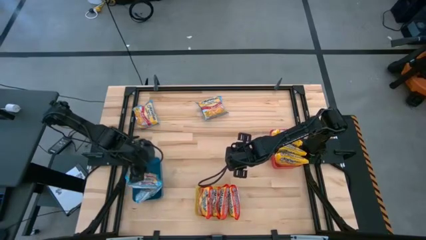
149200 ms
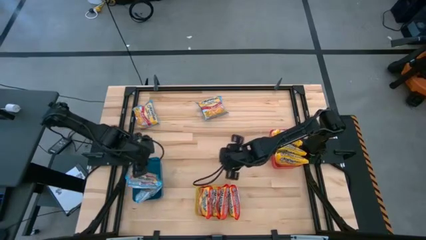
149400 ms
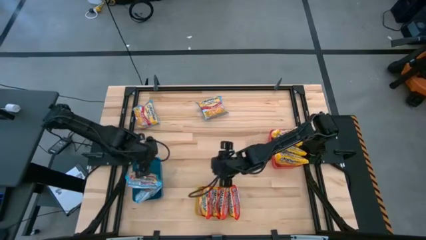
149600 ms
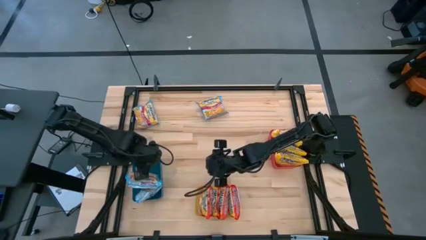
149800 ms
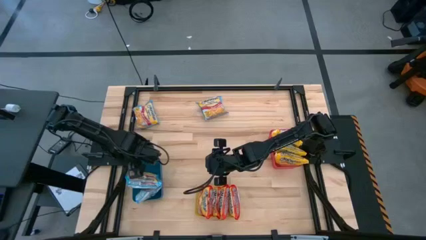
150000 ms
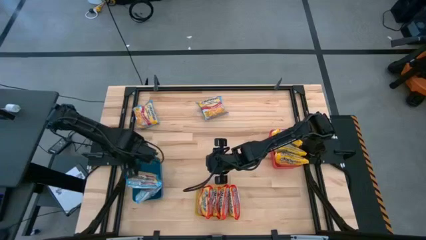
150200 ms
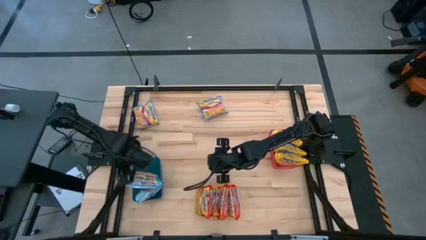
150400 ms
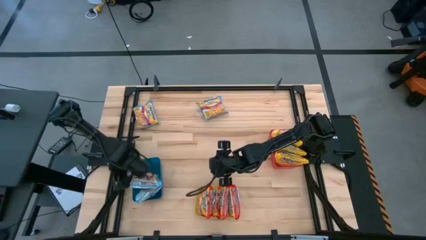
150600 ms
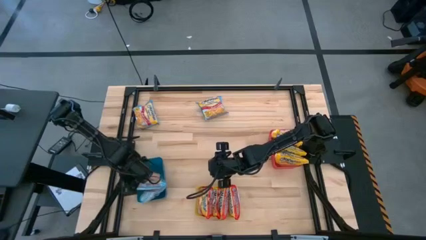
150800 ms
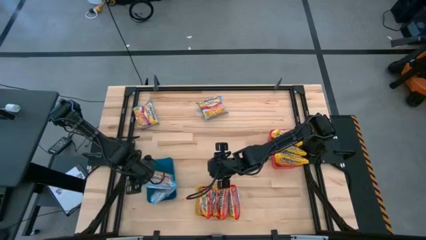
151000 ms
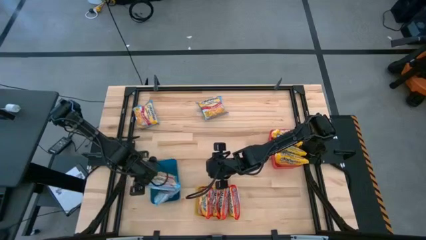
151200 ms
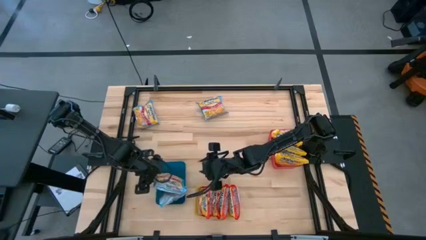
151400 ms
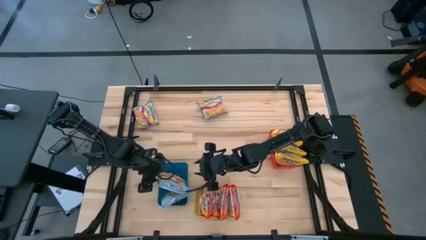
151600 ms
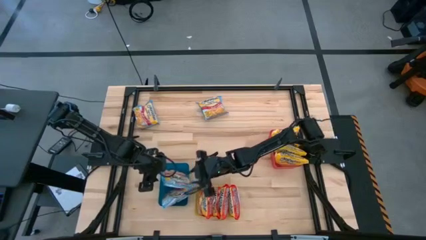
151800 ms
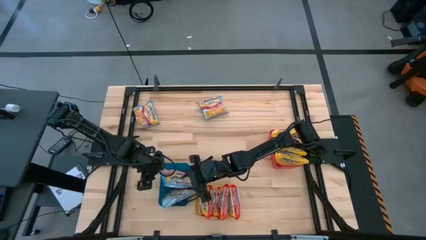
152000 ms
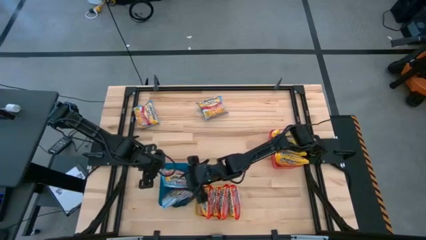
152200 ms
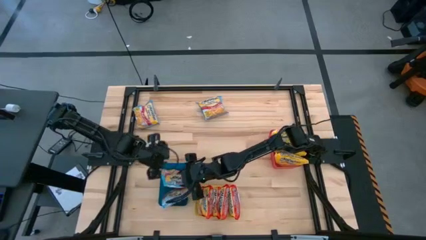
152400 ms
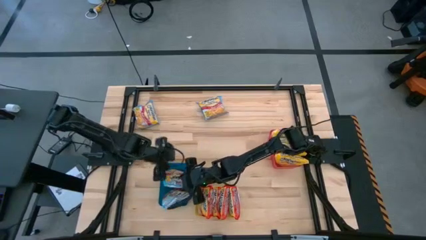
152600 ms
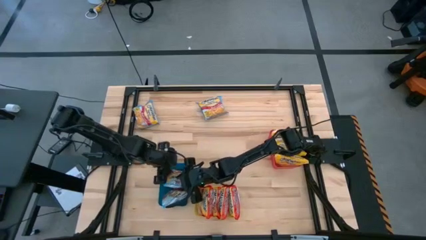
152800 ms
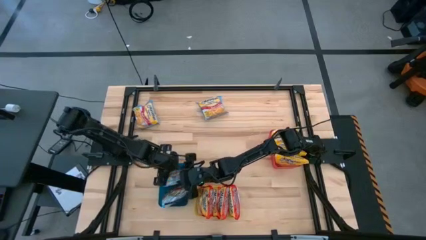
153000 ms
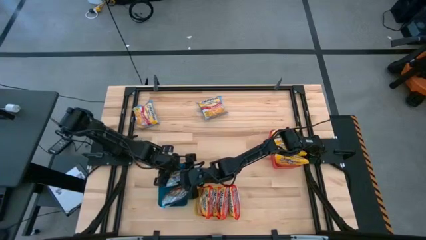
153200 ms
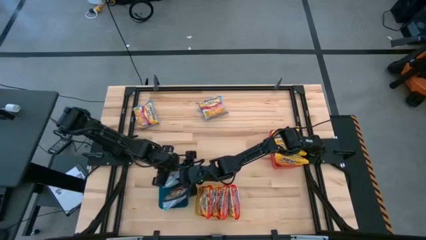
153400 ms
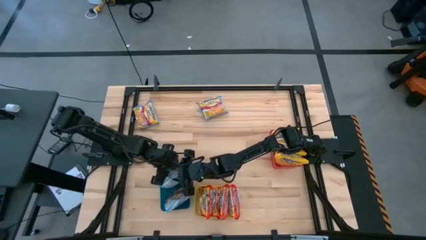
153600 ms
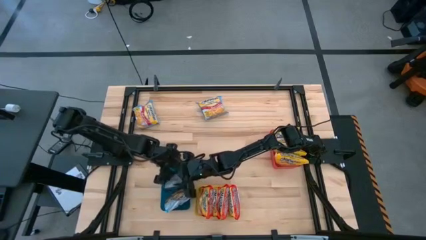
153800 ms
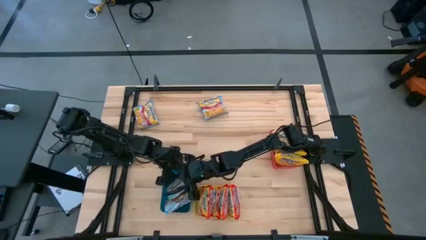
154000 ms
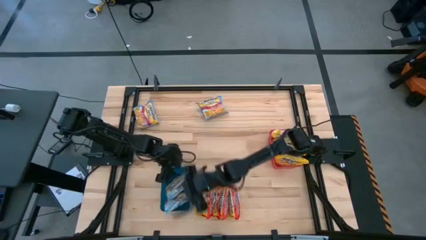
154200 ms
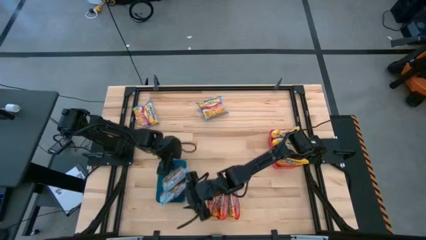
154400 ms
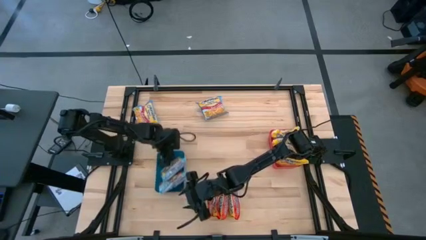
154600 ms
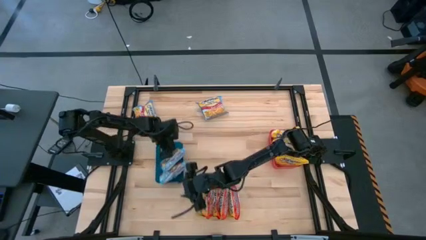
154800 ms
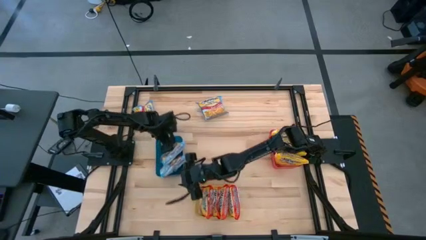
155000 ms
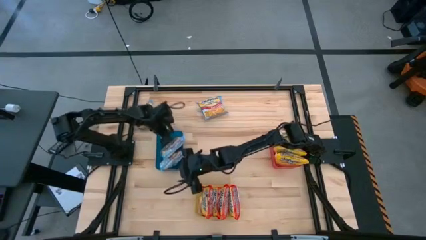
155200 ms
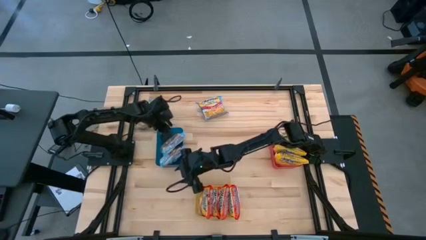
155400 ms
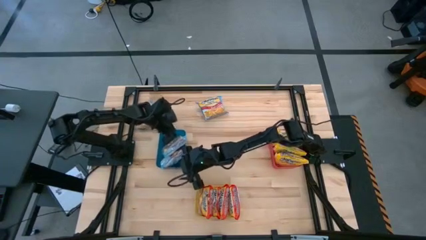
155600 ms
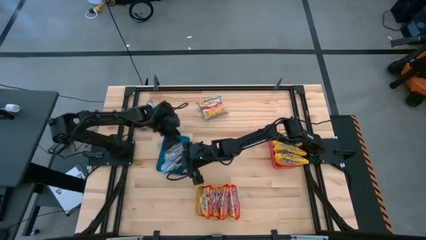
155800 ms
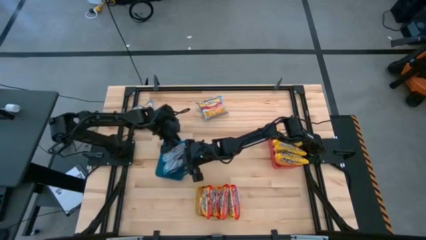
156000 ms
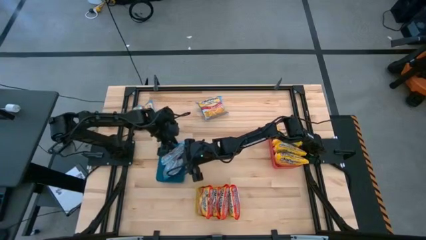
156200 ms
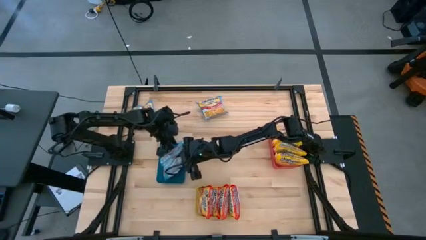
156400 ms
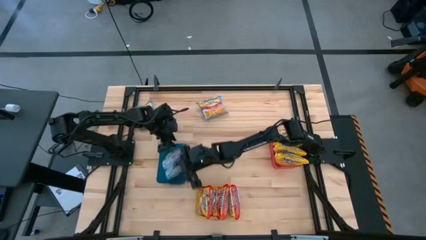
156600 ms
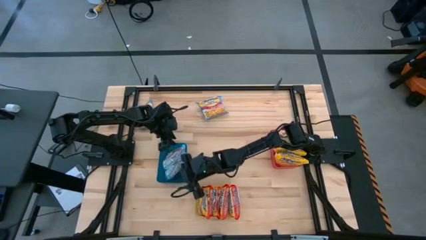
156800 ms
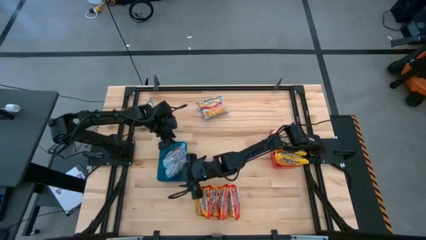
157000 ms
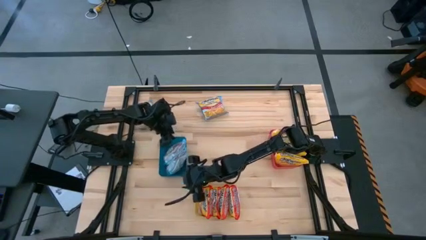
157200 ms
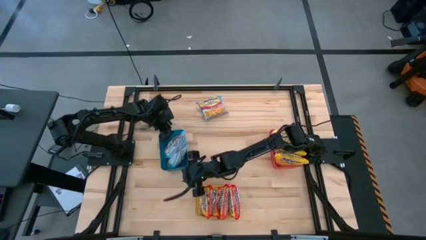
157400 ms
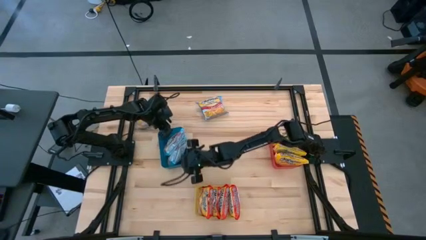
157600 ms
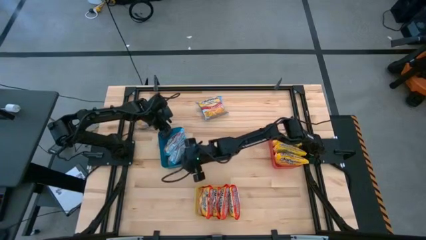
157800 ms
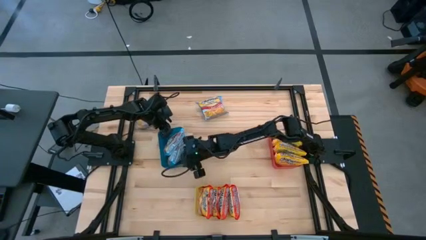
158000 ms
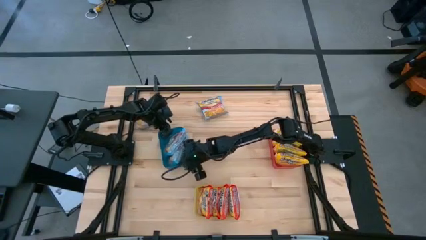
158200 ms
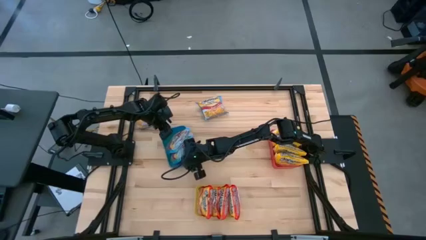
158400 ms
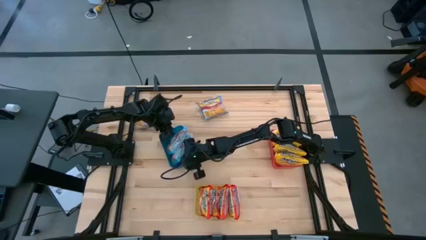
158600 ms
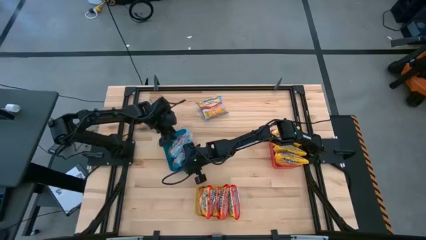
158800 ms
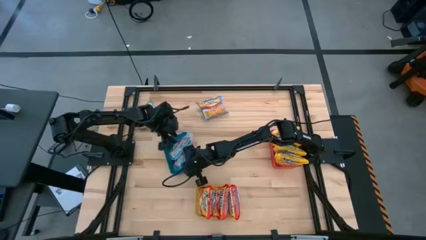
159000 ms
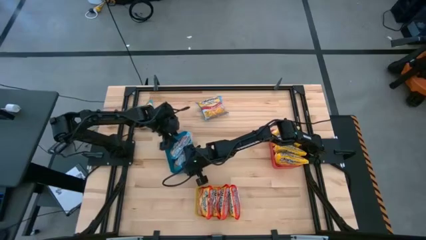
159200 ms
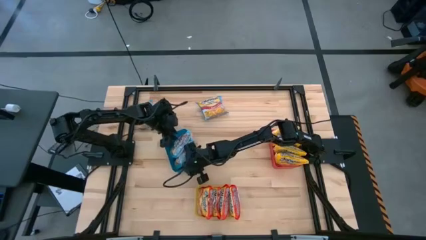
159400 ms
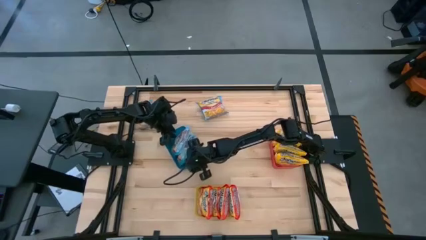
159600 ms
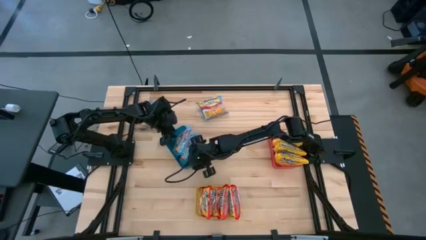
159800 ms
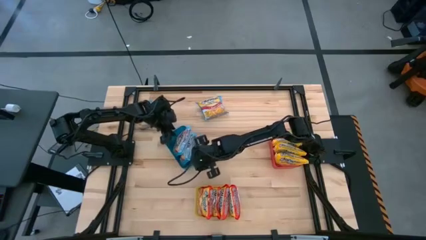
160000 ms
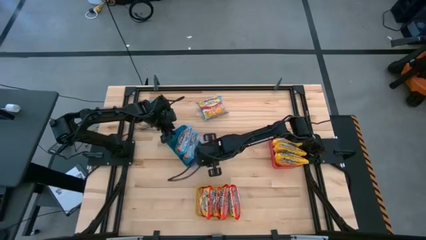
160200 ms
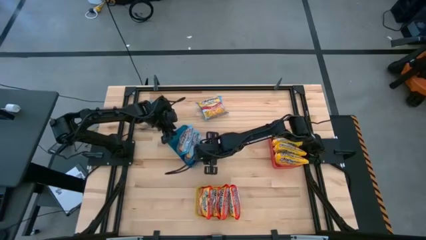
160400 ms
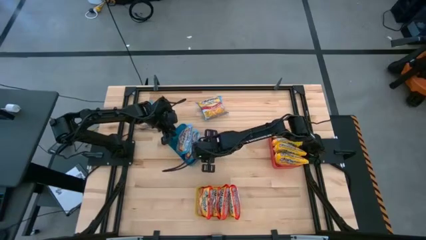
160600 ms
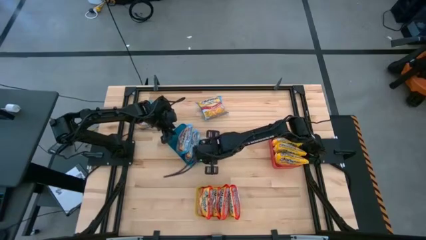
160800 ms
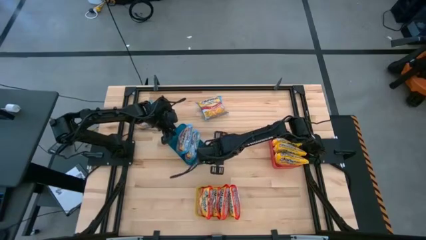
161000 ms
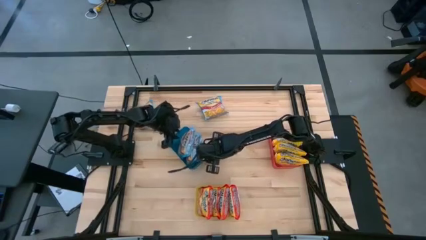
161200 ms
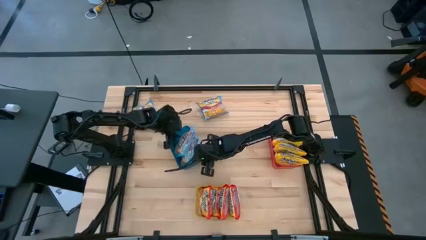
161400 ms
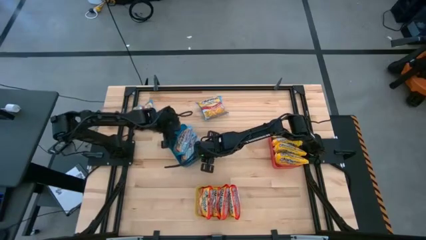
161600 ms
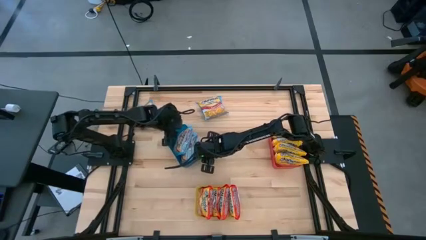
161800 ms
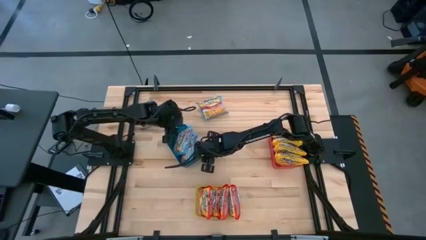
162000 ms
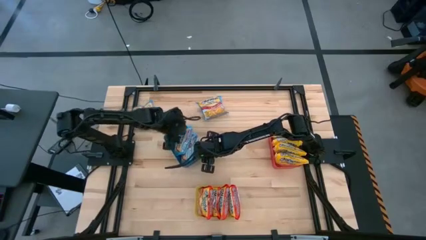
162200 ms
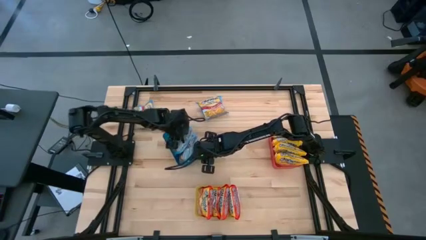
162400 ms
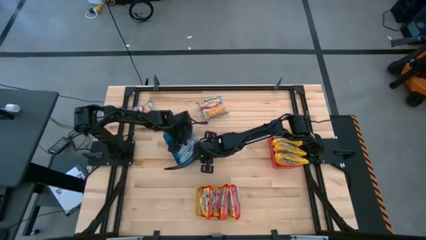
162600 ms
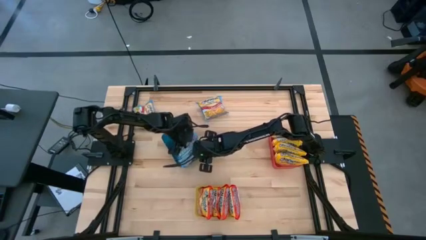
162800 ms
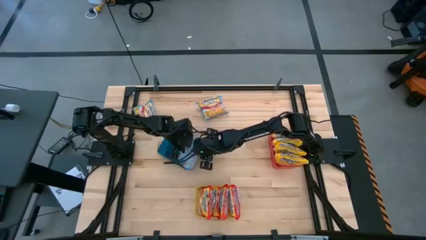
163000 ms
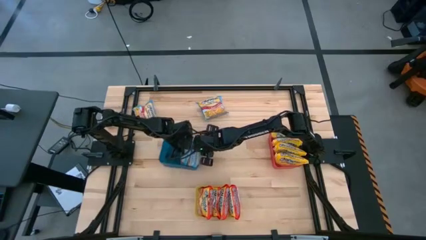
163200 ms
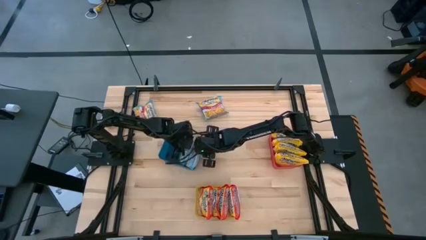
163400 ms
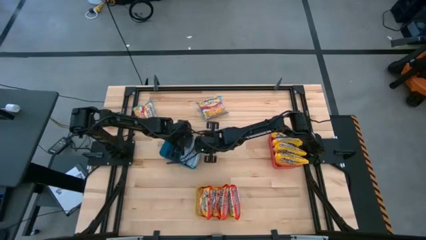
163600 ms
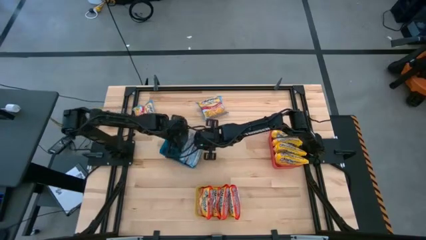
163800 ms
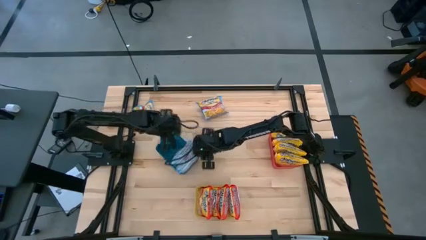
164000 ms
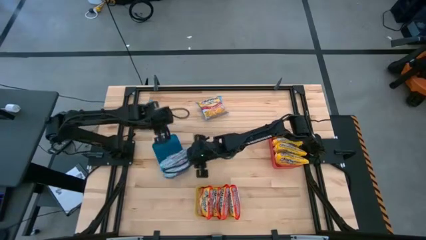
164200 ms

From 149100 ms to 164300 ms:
Task: Sort Maruchan noodles
Adjust the blue noodle packs in the blue bin
